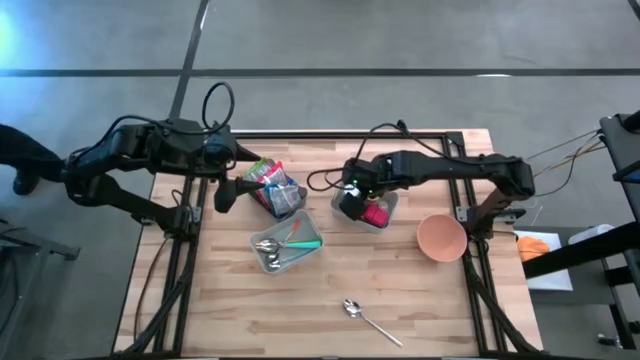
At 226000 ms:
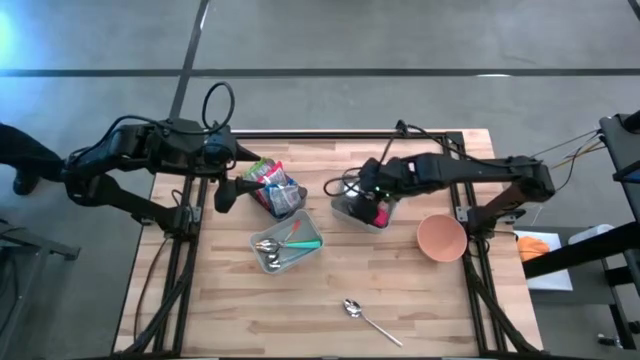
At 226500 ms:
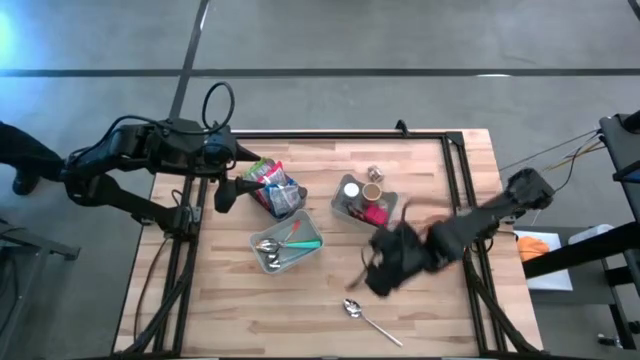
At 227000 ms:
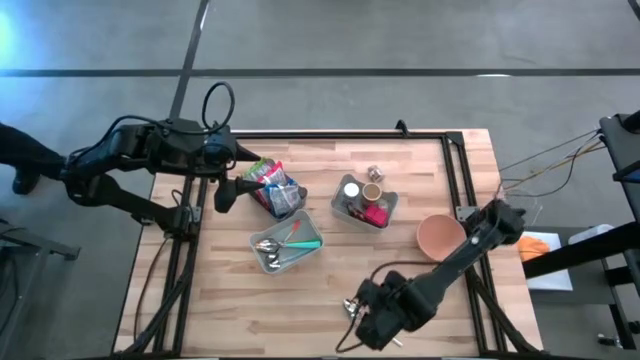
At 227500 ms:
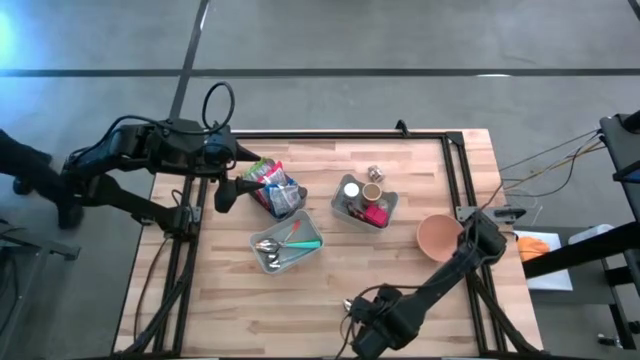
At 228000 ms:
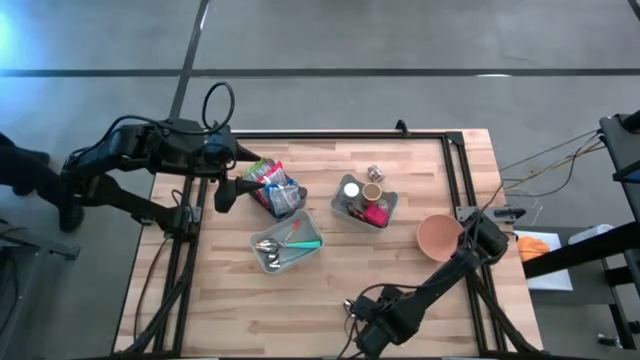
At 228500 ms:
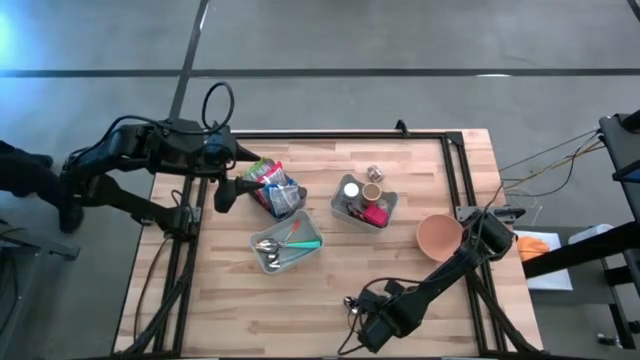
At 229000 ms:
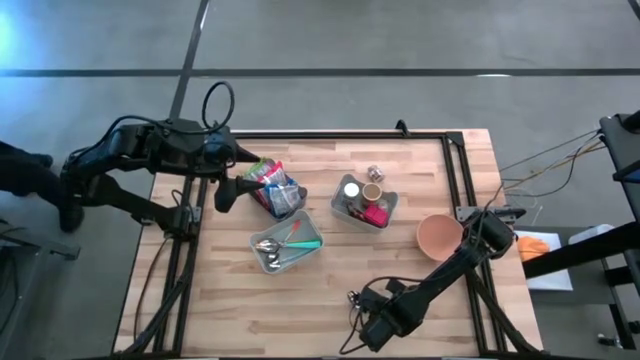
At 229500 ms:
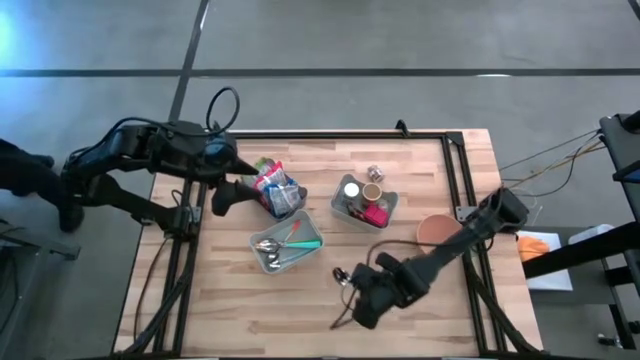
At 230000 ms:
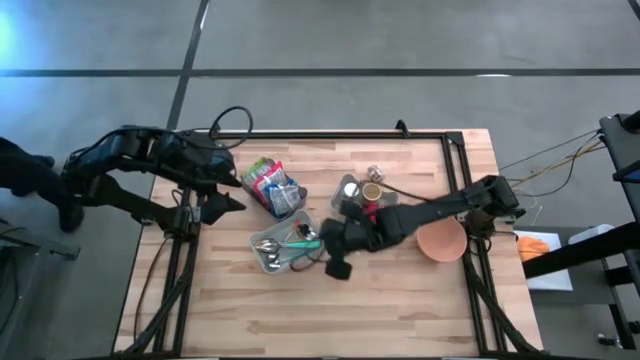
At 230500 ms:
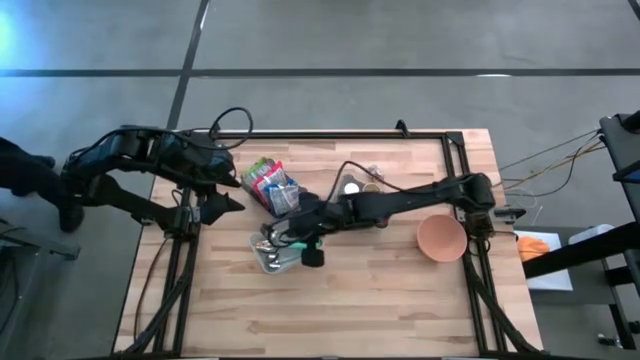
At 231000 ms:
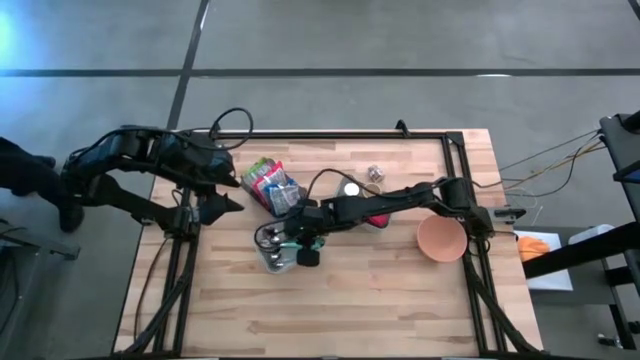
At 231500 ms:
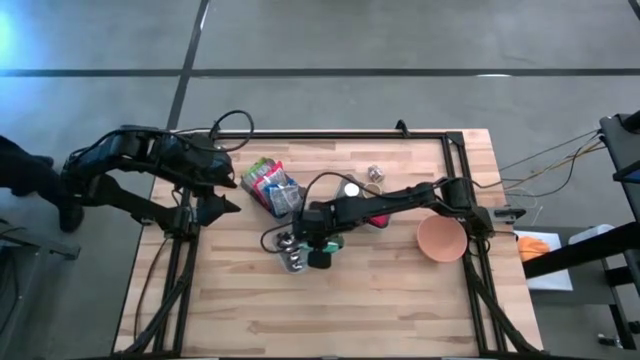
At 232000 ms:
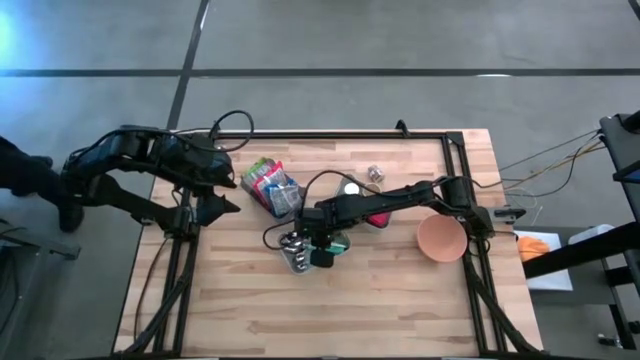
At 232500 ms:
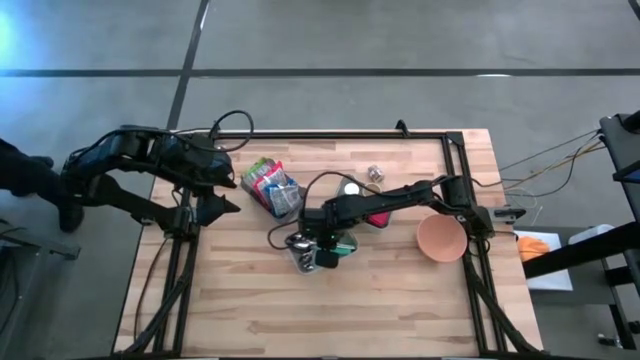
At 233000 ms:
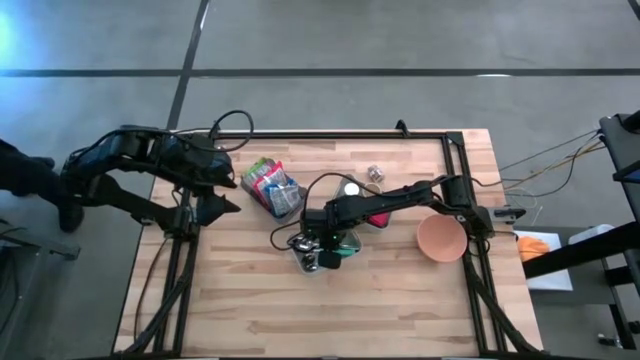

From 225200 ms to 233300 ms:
Put the silver spoon into the bottom gray bin

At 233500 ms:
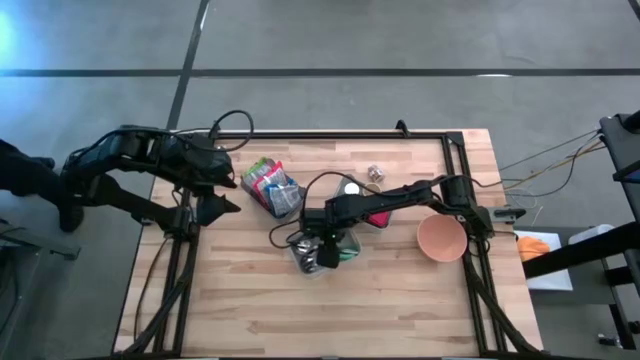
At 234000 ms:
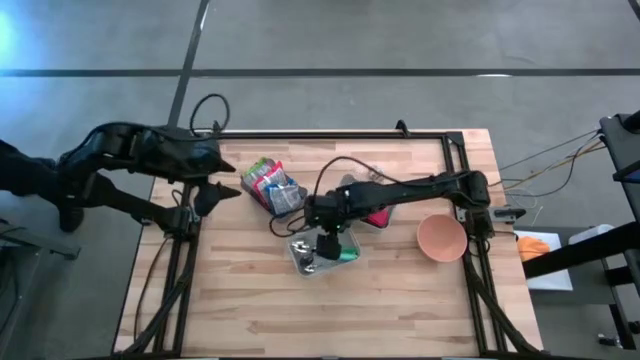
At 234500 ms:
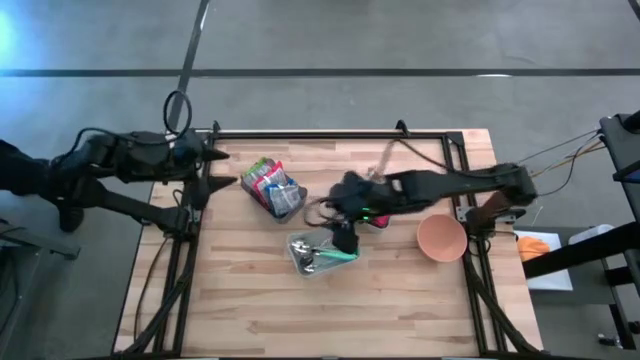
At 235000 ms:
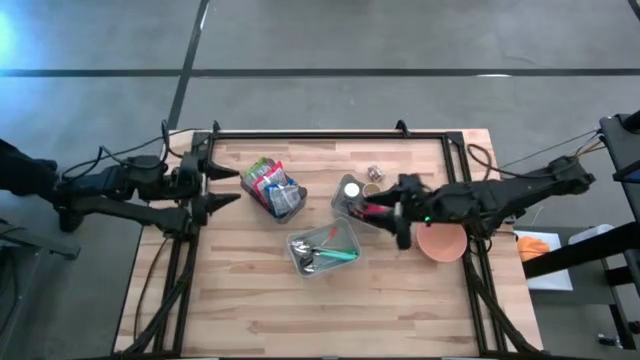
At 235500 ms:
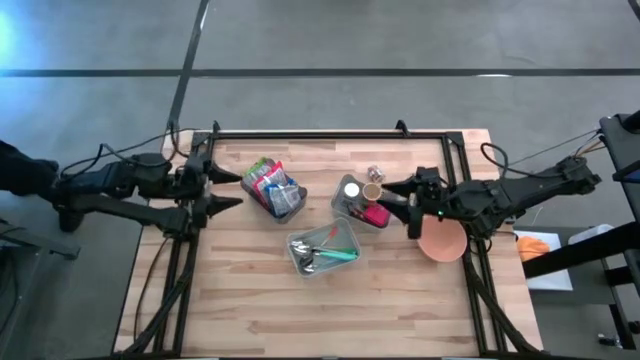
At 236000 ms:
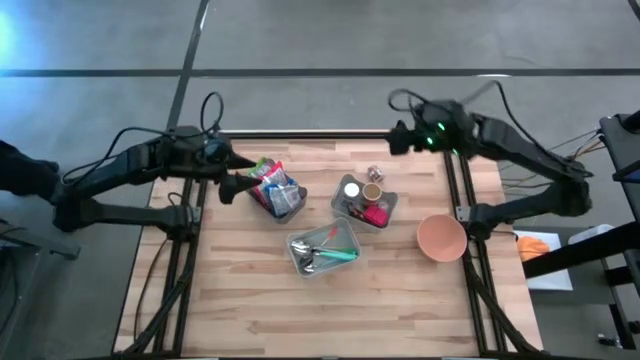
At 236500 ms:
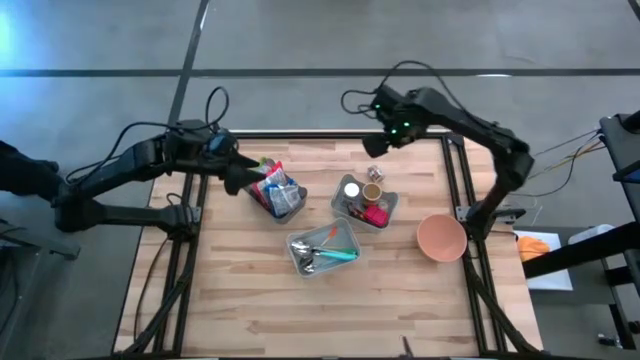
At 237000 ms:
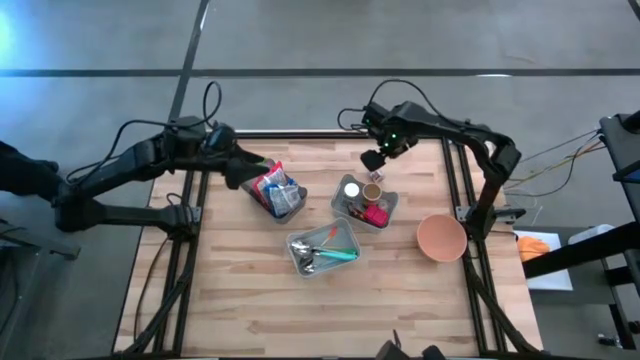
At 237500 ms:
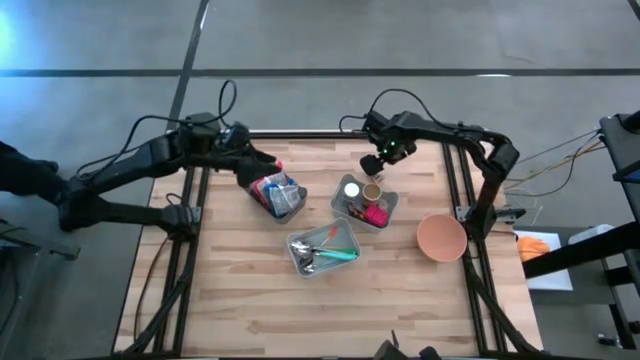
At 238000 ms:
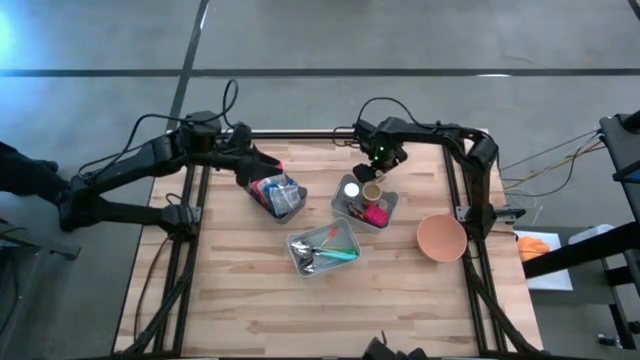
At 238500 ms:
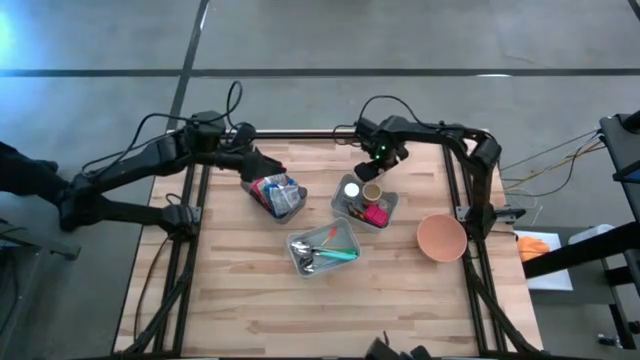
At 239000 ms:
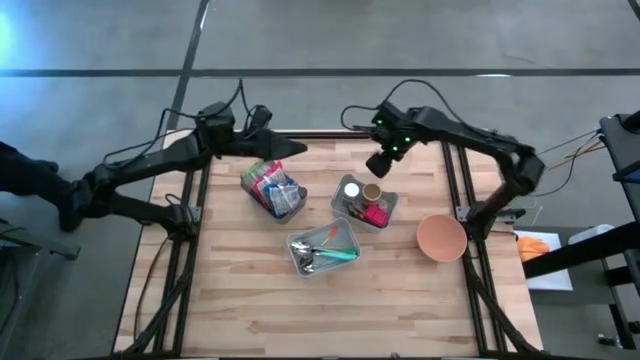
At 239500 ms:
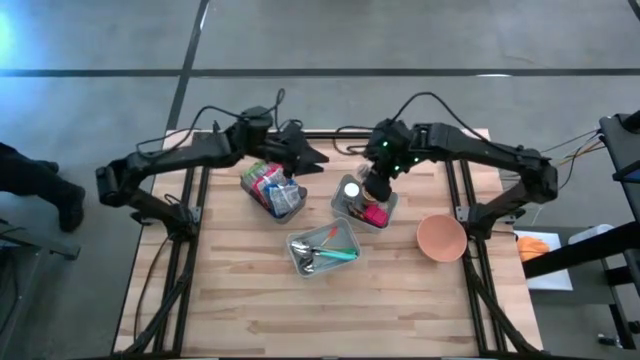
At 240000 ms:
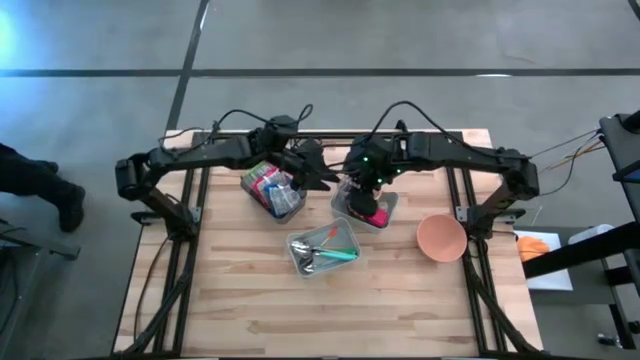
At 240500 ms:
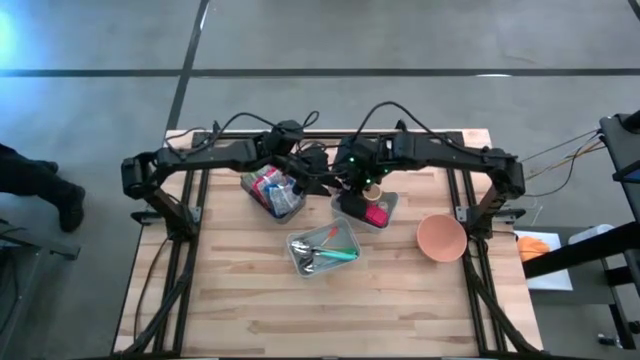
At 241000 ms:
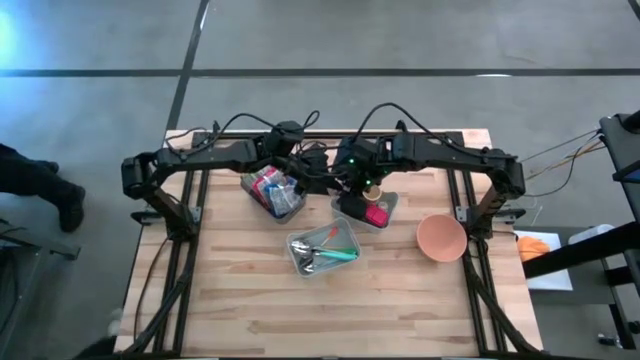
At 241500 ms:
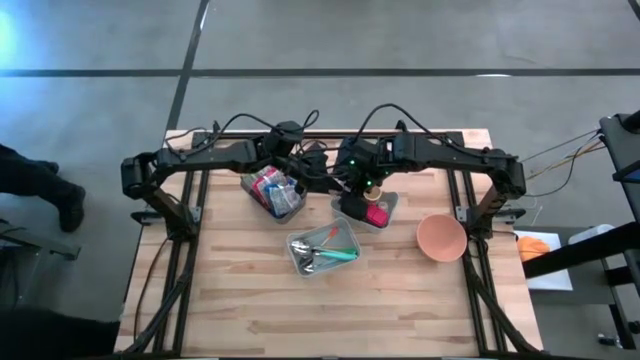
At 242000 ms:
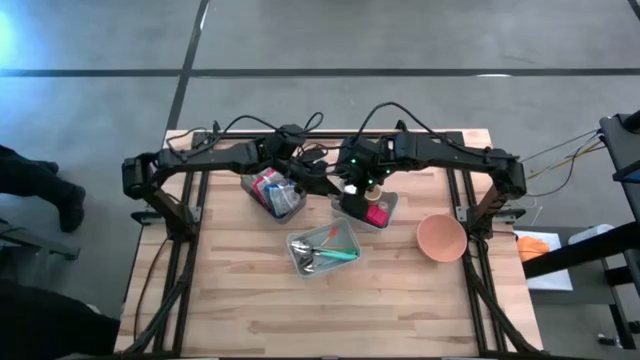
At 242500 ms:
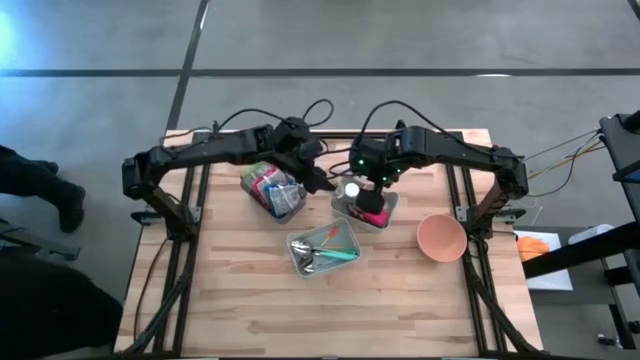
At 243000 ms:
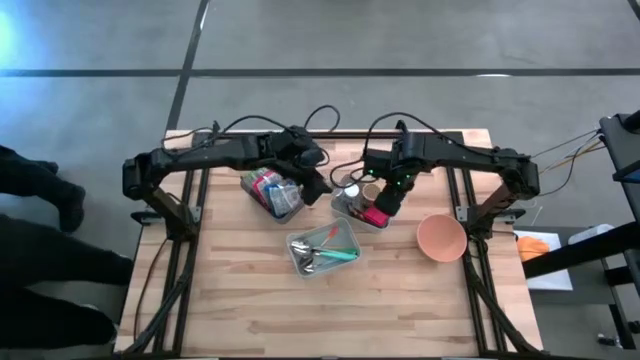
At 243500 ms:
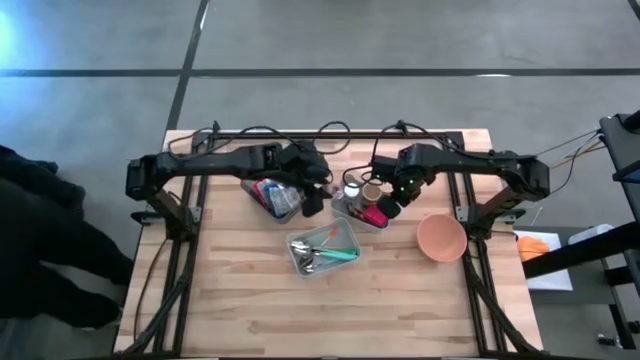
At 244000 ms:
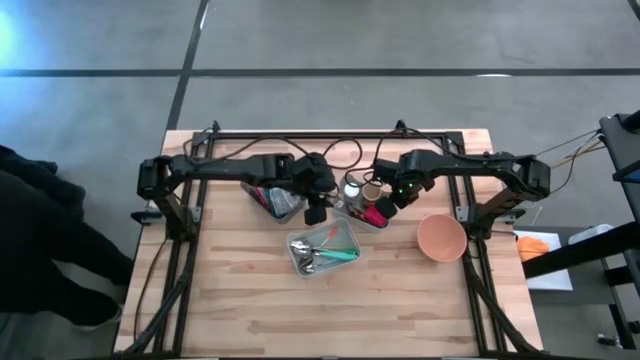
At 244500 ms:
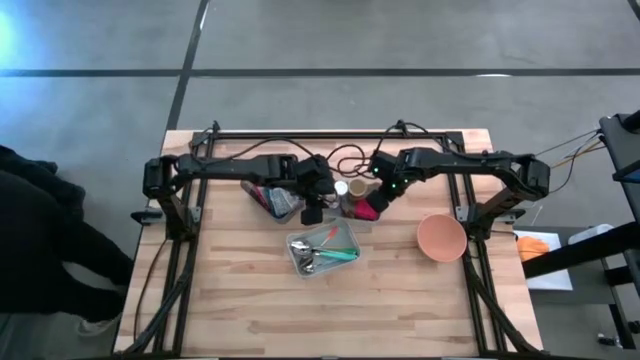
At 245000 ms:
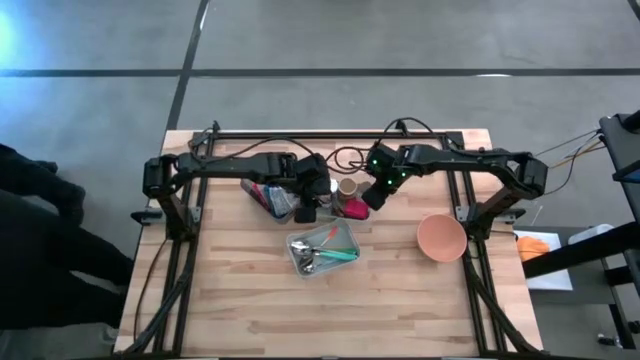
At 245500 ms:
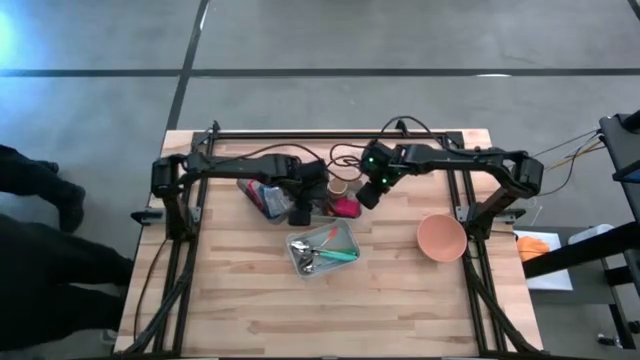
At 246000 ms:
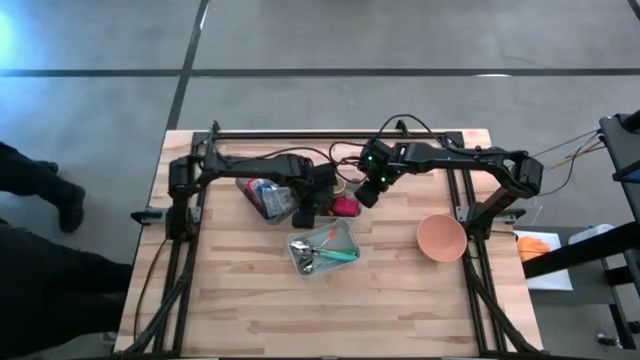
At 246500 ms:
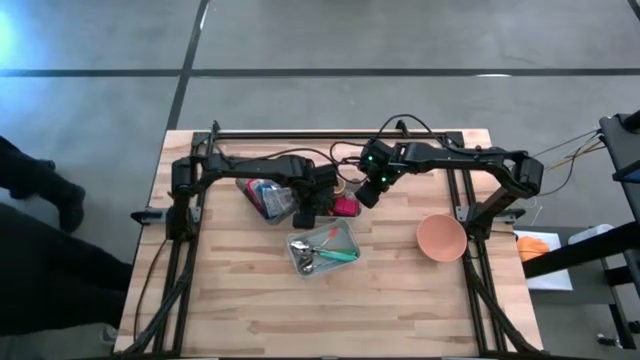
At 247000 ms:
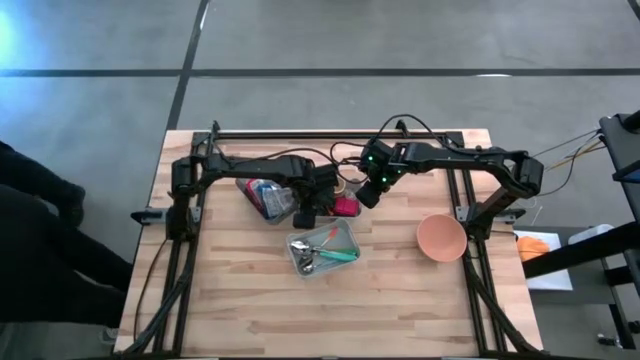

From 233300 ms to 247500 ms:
Put the brown seasoning bottle into the top gray bin
